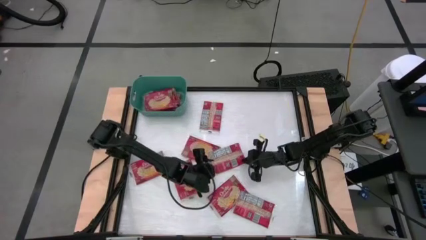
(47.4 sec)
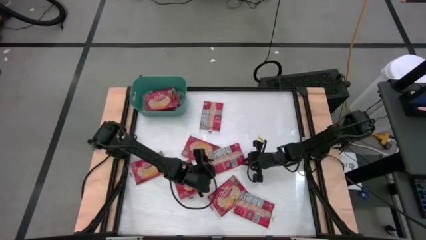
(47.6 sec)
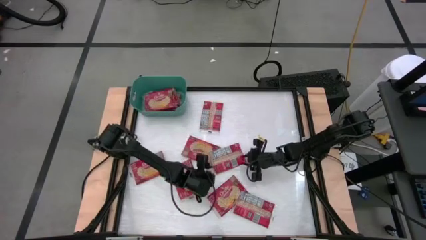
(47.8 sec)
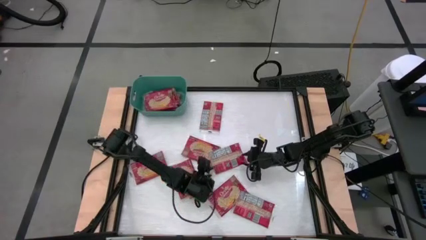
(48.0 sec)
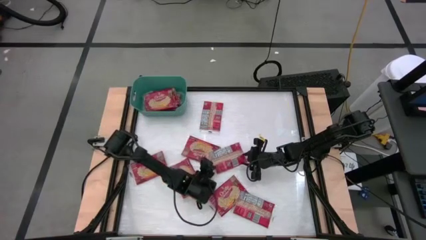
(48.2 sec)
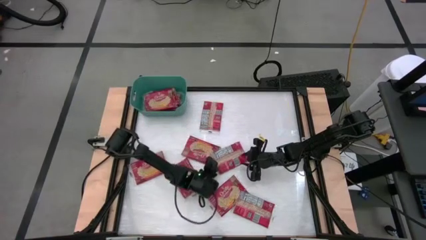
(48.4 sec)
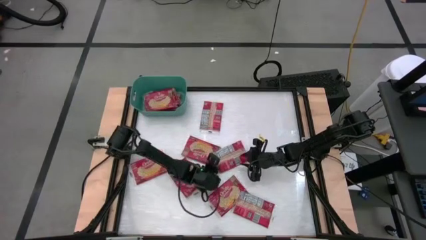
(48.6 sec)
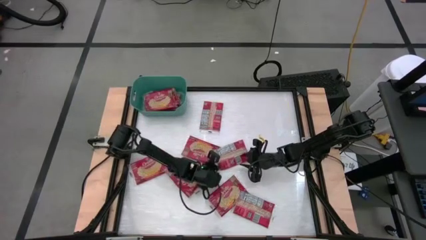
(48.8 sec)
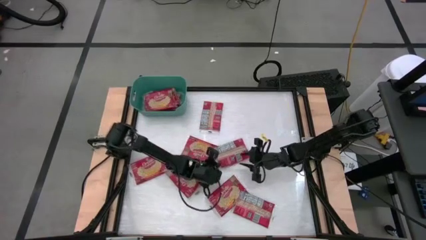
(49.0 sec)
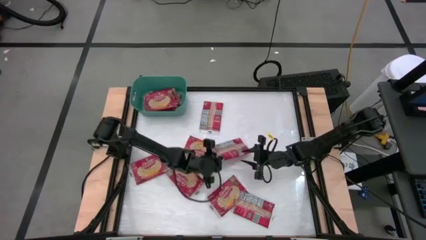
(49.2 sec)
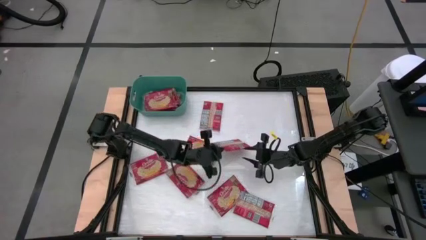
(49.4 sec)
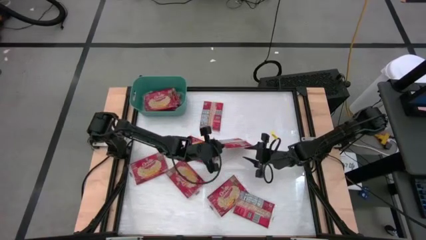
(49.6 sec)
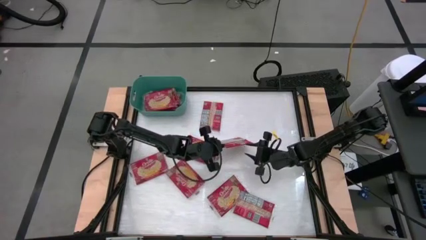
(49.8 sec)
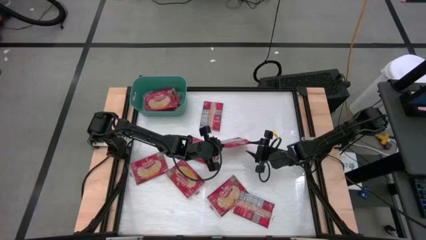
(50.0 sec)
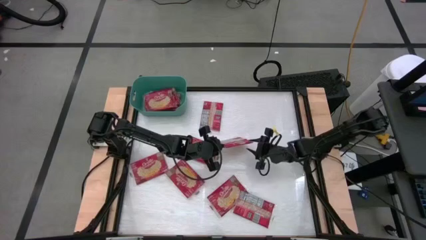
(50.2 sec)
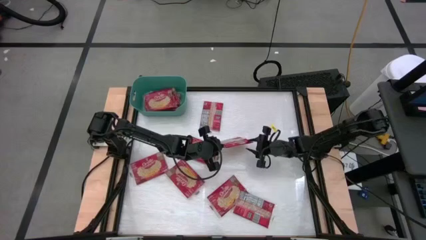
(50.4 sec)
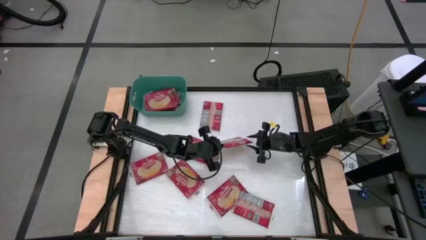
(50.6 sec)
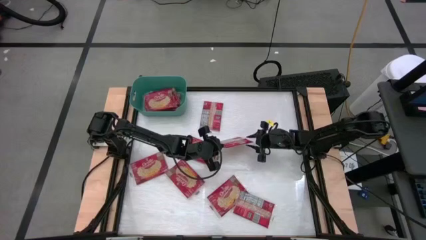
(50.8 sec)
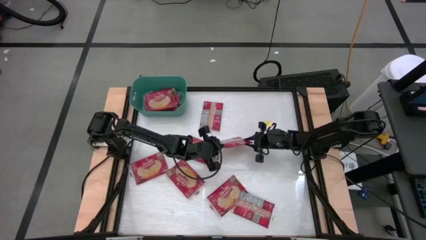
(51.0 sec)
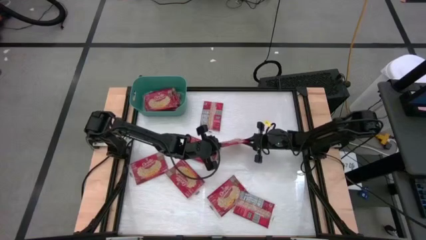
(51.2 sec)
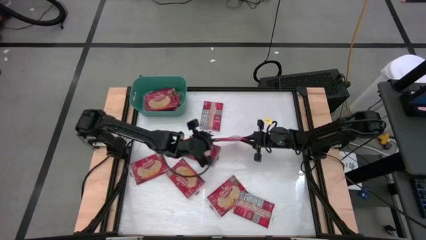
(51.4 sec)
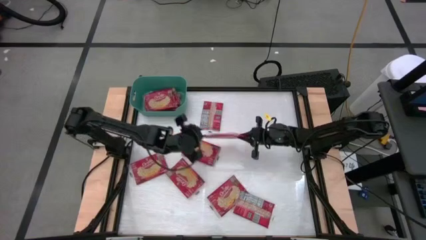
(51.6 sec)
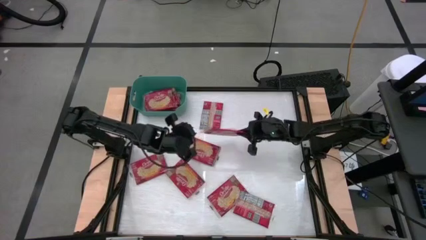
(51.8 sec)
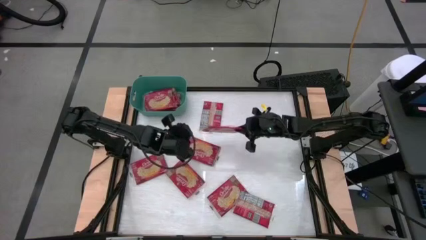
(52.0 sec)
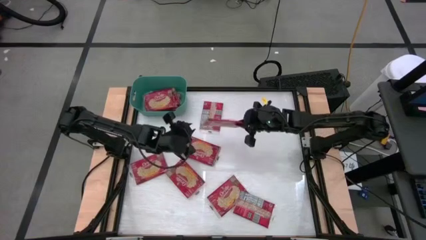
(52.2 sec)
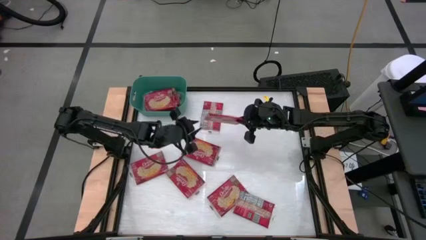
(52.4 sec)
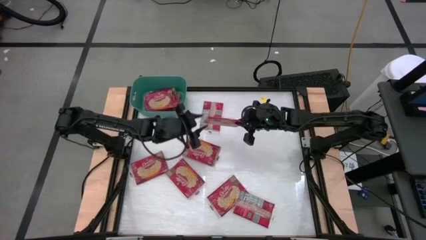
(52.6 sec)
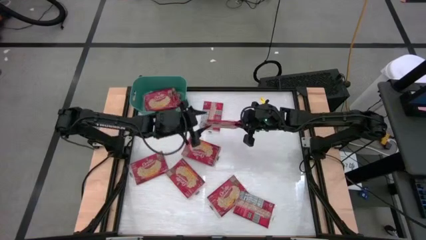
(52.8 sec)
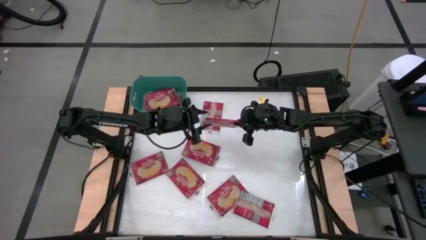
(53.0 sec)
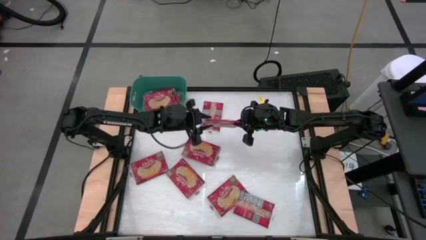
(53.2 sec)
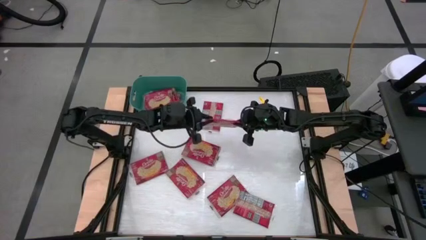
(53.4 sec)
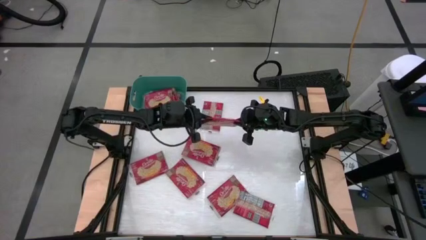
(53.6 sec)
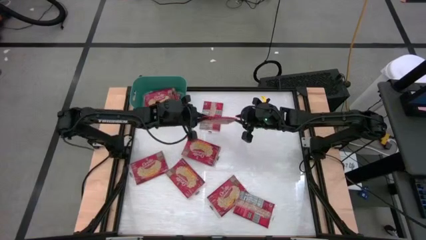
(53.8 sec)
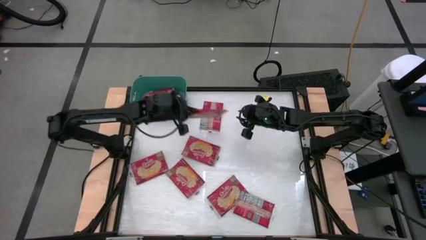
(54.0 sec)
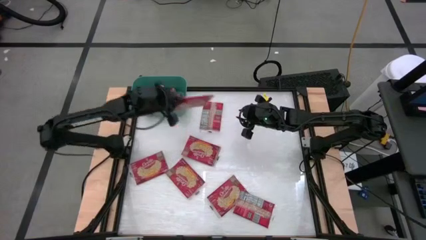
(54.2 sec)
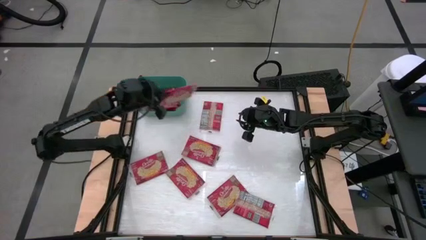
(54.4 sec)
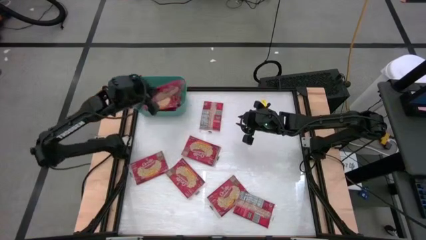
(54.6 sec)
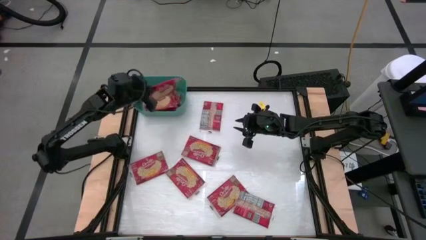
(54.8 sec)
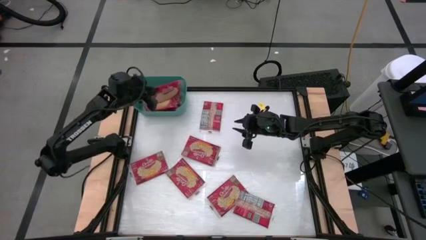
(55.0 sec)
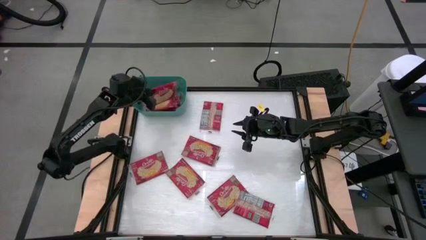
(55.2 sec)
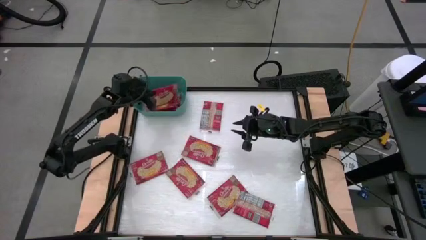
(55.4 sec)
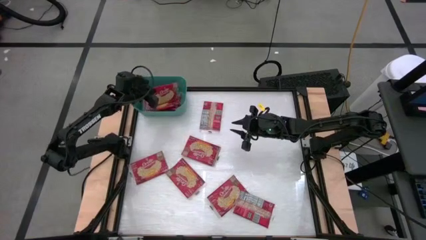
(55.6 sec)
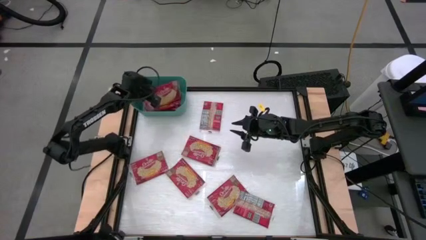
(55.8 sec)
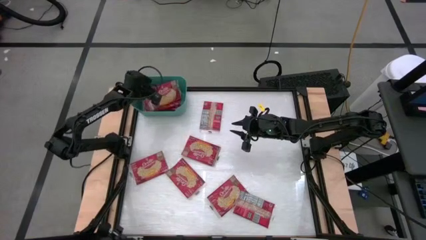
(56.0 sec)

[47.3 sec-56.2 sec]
Task: Sort popcorn bags into baskets
Stack the red popcorn bag on the red popcorn bags in the green bin

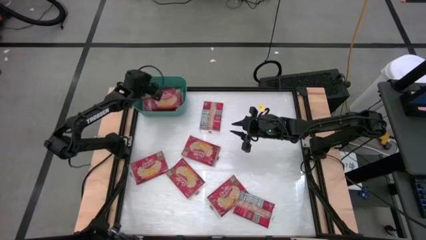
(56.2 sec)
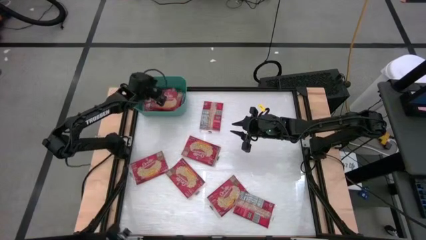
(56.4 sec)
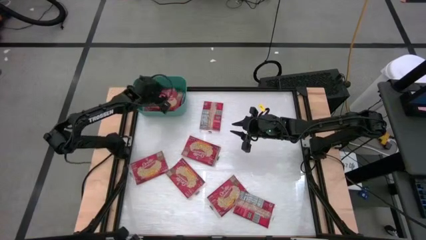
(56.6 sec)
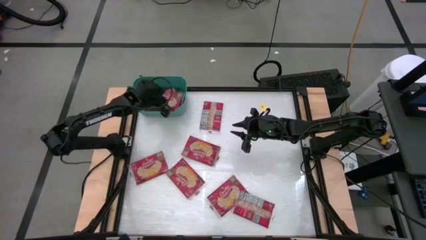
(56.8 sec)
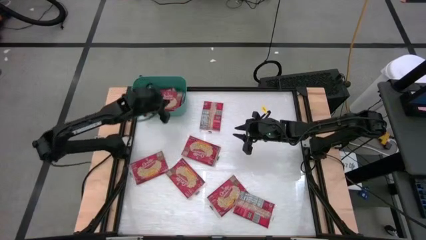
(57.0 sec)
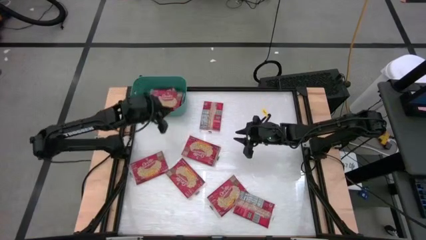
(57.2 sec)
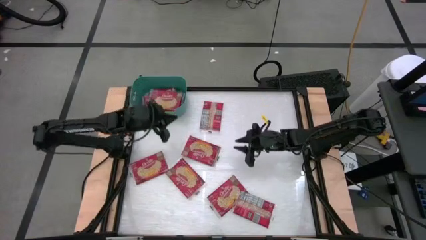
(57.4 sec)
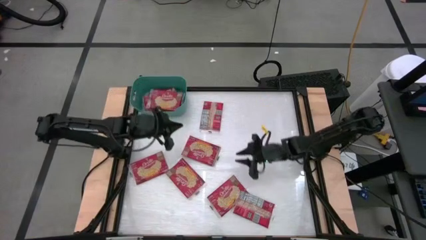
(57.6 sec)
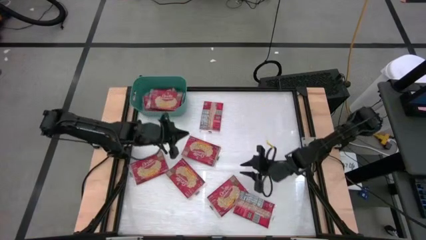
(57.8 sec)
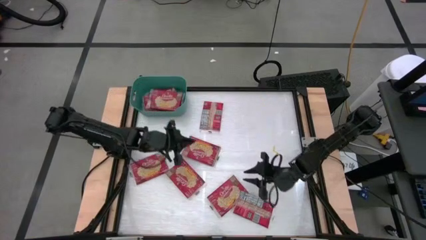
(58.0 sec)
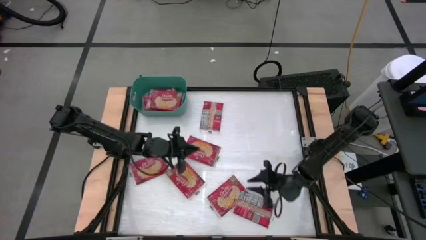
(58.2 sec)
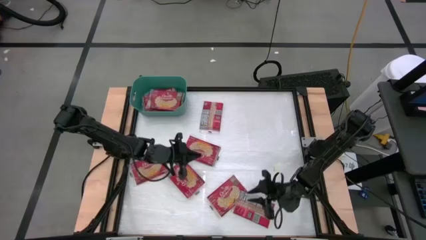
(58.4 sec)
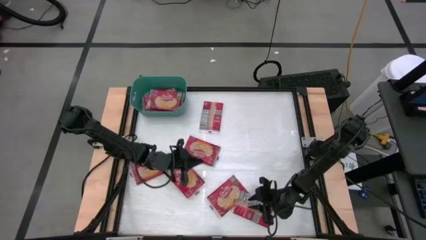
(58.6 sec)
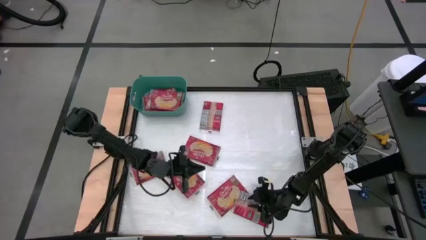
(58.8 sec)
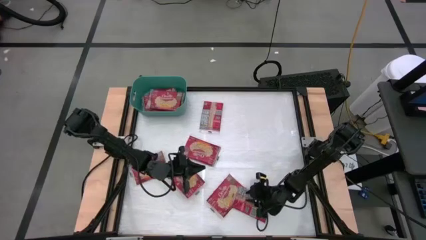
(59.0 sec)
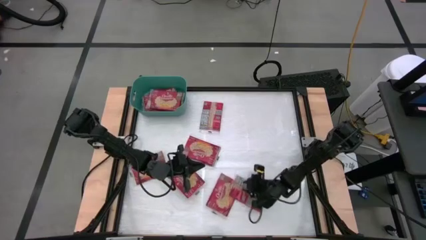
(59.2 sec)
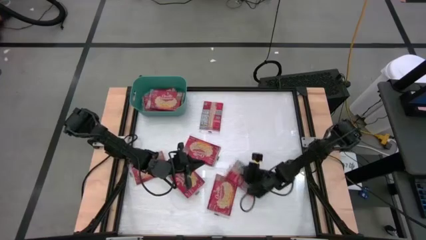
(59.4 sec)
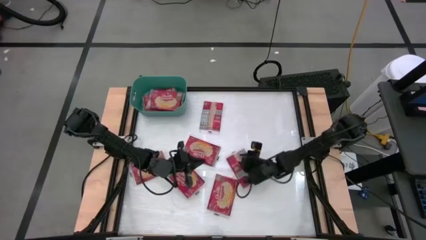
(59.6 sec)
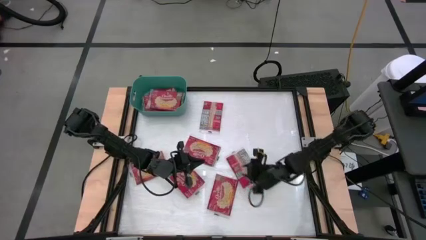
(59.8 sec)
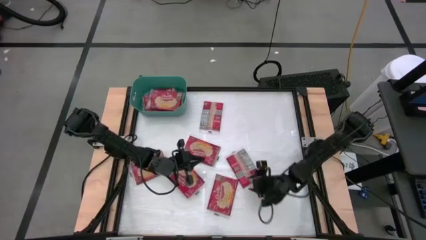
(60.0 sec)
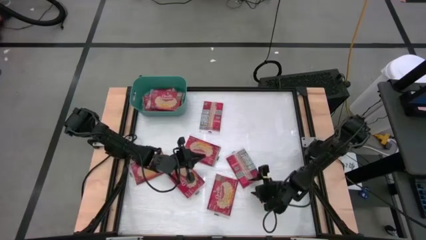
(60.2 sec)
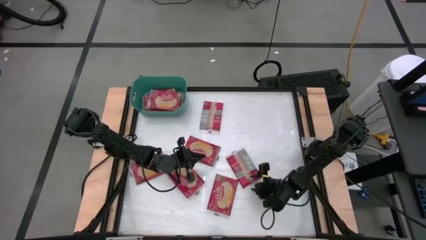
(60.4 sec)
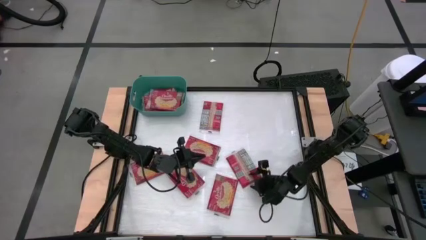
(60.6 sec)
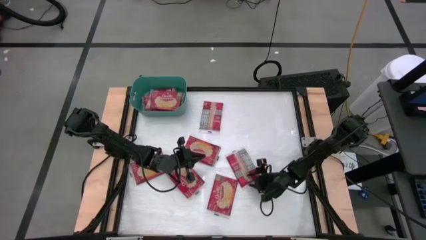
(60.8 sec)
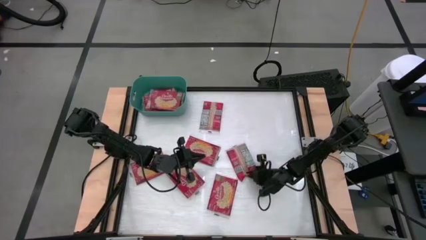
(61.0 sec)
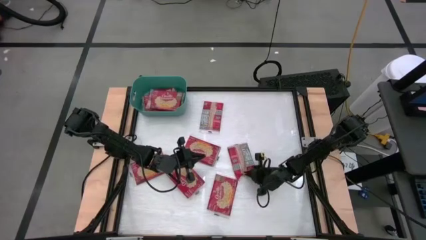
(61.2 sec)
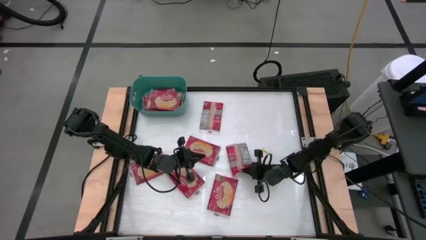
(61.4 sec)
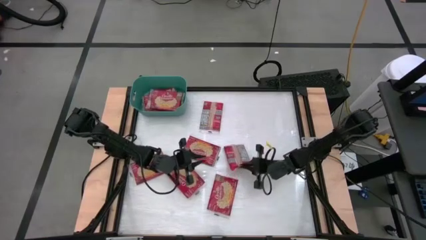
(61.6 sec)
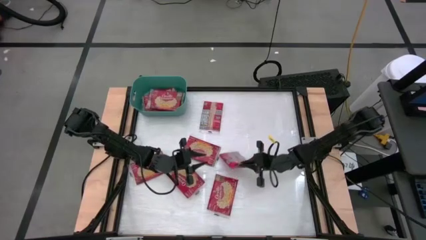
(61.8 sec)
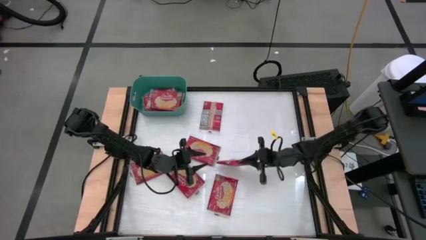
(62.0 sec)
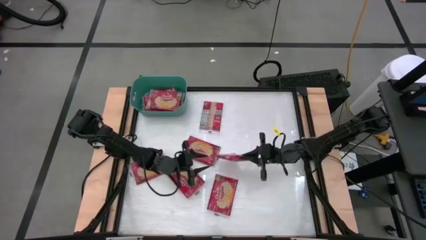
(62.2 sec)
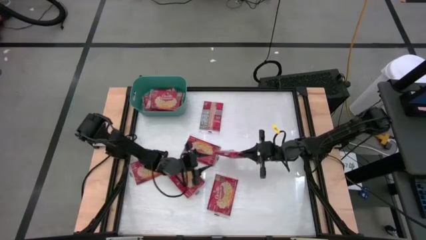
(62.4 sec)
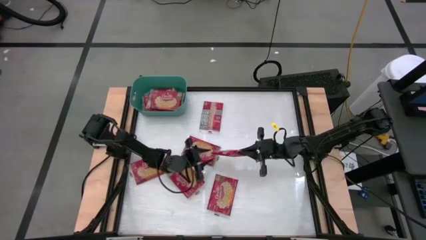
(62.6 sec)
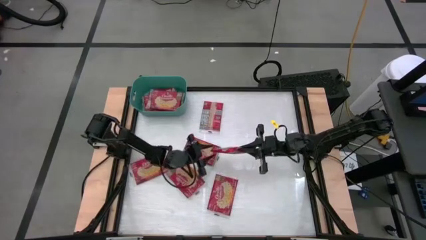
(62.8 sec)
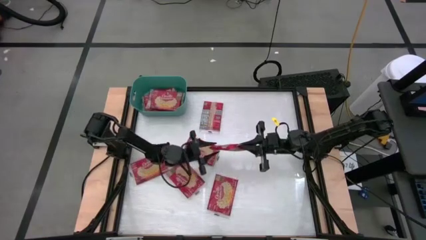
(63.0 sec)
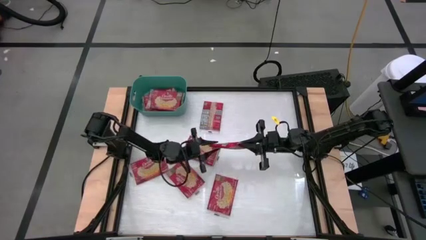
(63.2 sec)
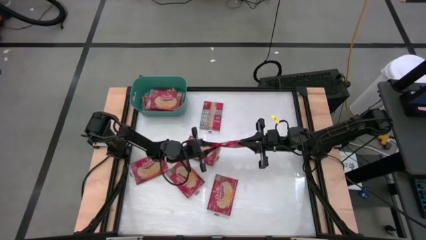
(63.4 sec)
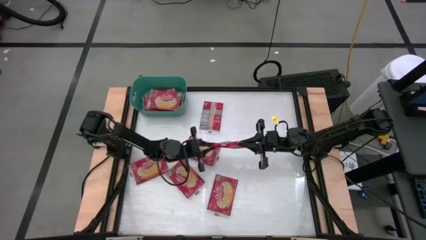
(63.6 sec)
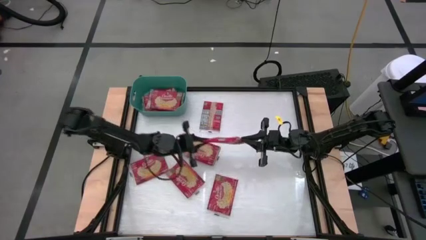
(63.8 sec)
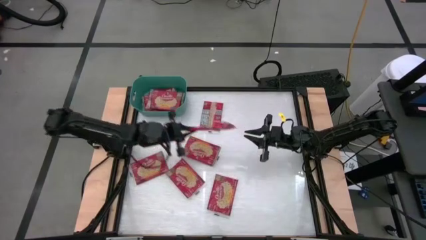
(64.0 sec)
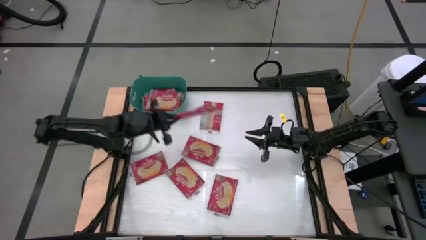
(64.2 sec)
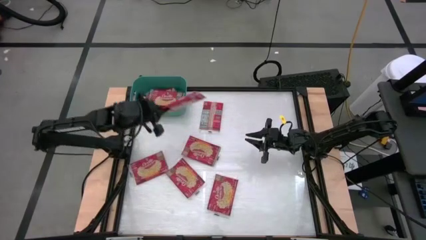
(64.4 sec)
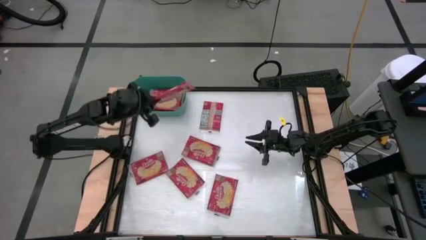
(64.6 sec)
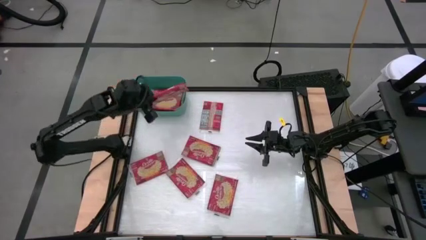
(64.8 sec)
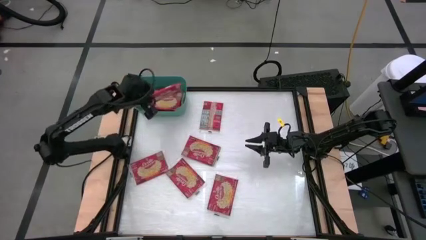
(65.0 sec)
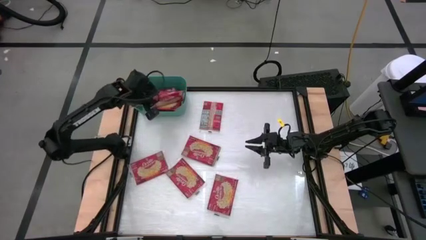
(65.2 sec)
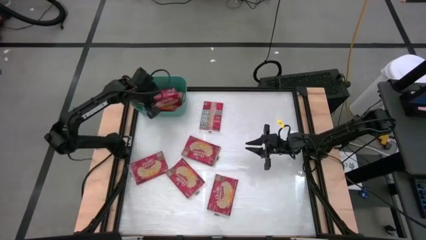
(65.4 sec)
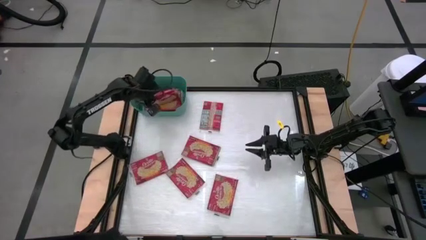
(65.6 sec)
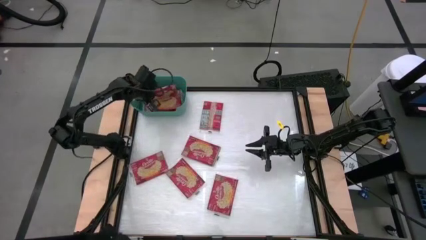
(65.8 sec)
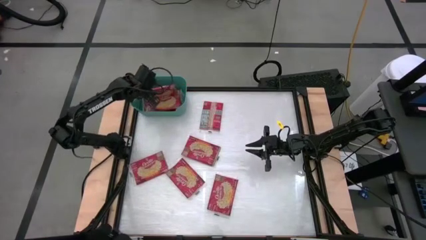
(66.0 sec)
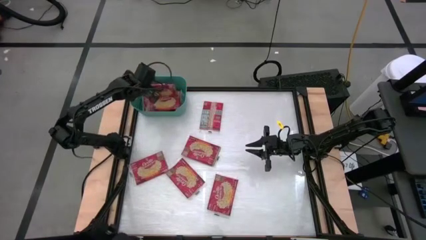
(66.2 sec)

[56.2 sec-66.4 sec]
Stack the red popcorn bag on the red popcorn bags in the green bin
